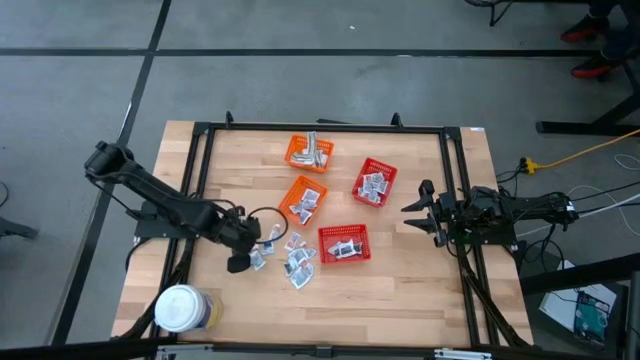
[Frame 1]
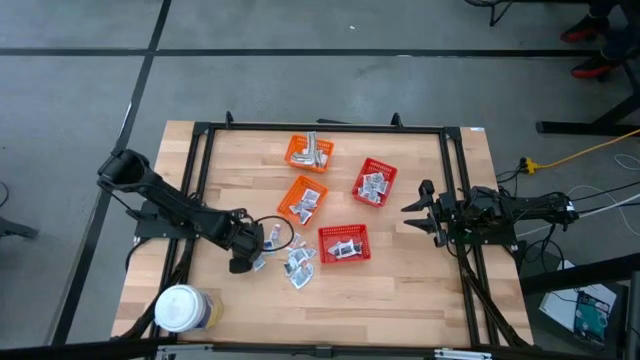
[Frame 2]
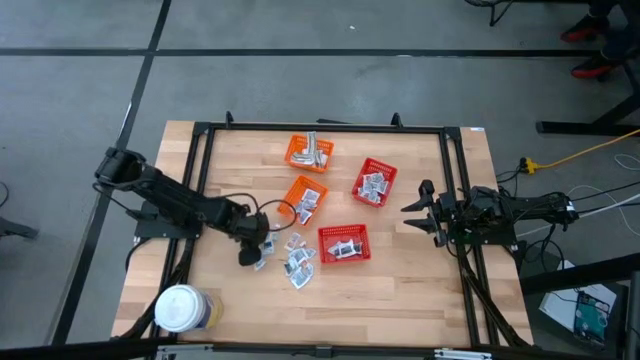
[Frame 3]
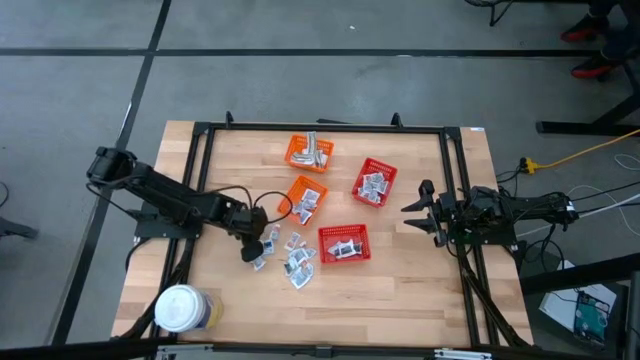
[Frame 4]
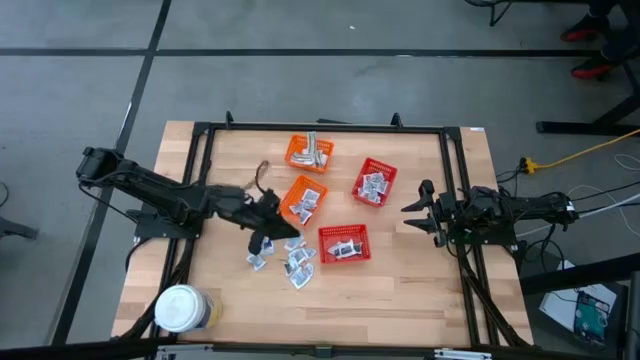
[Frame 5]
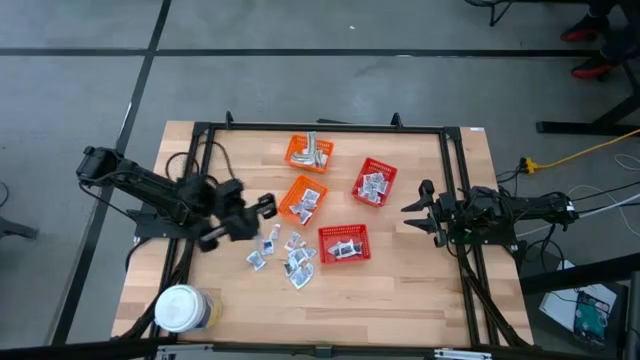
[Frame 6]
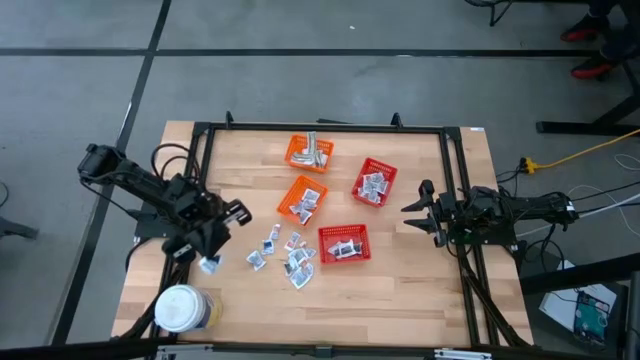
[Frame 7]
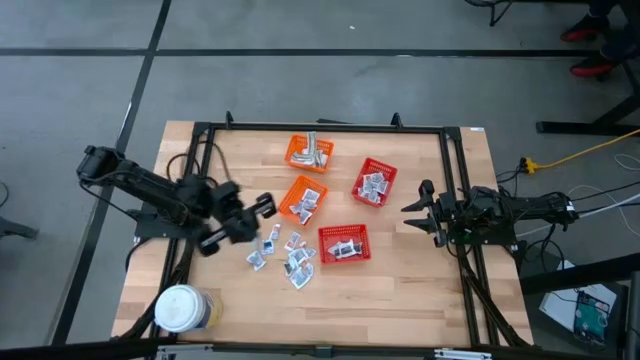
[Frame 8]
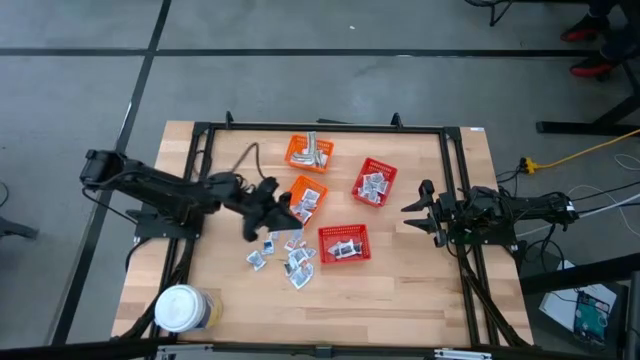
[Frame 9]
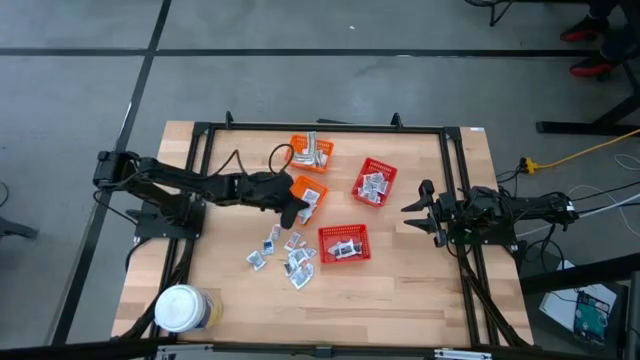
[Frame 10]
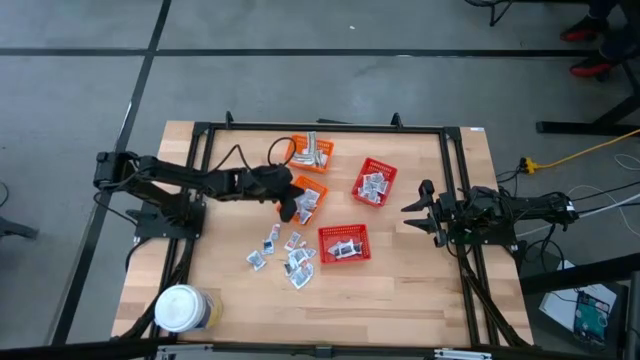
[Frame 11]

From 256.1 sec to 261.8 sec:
Task: Pick & Place First Aid Supplies
Put the blue alcohol pad into the bottom orange bin

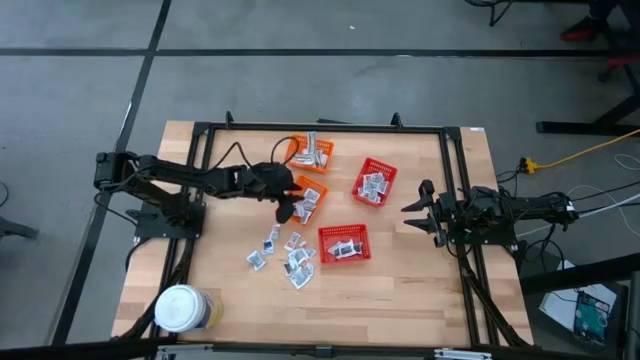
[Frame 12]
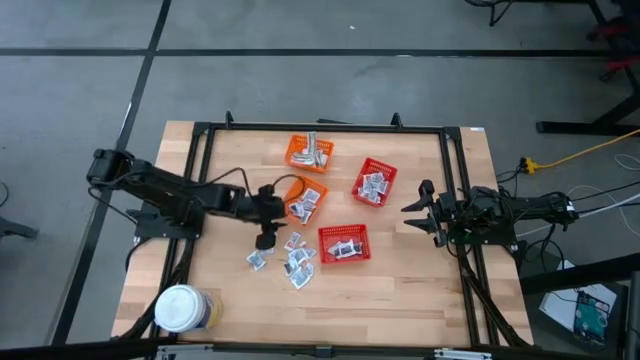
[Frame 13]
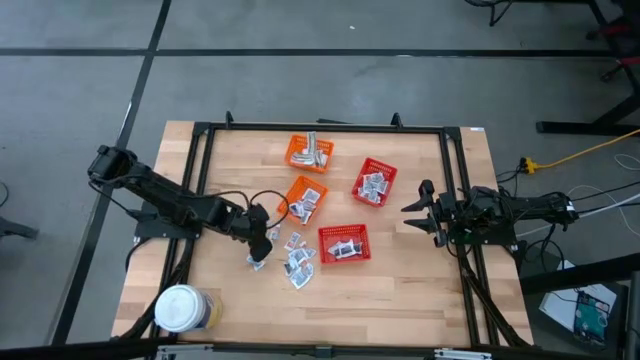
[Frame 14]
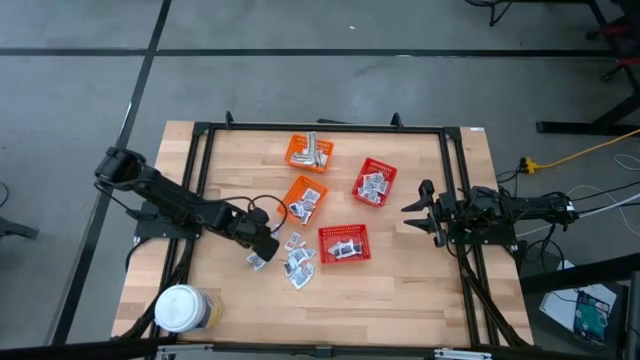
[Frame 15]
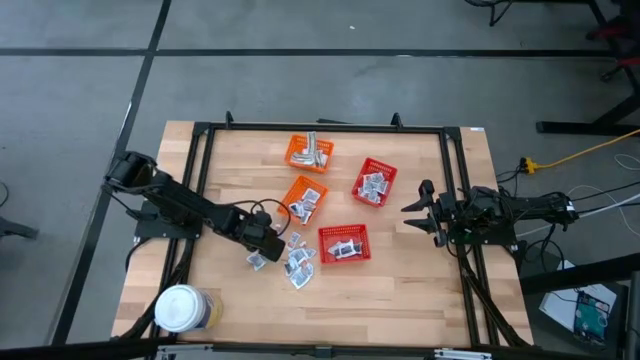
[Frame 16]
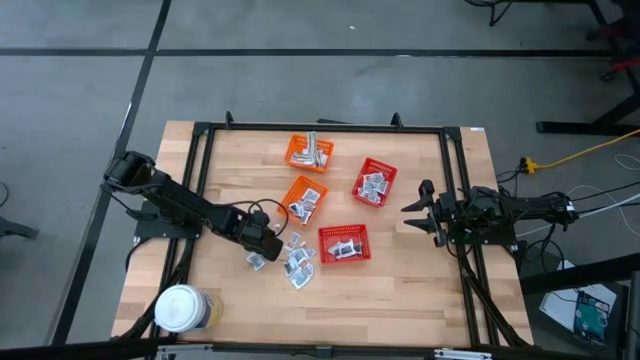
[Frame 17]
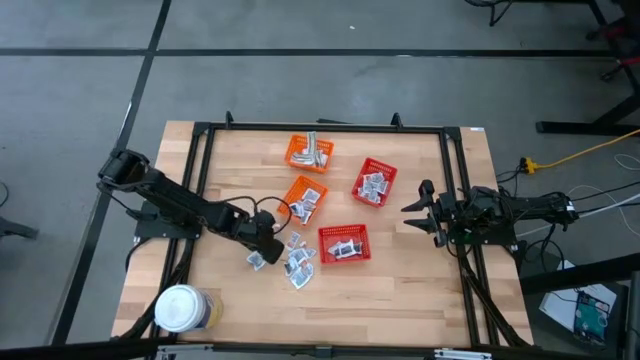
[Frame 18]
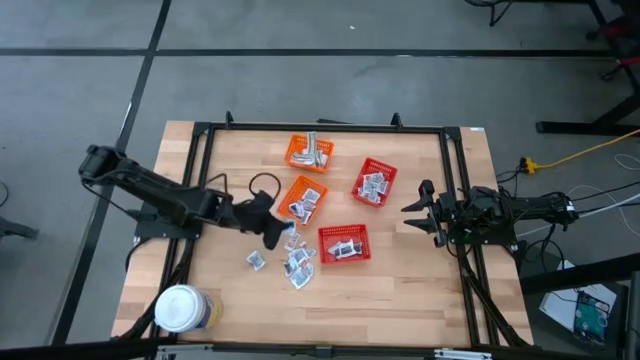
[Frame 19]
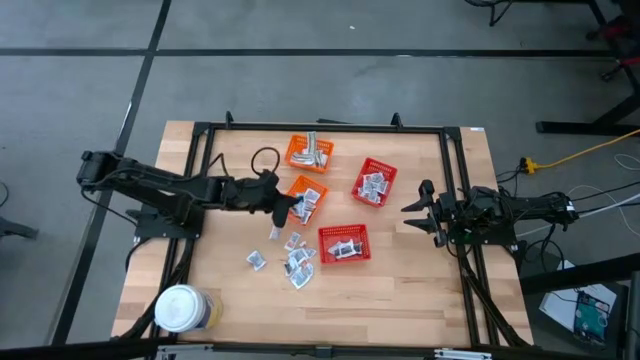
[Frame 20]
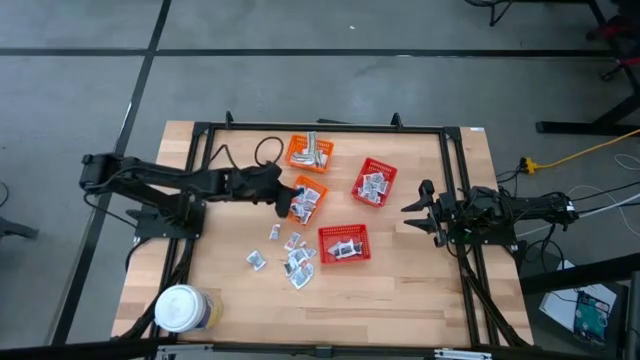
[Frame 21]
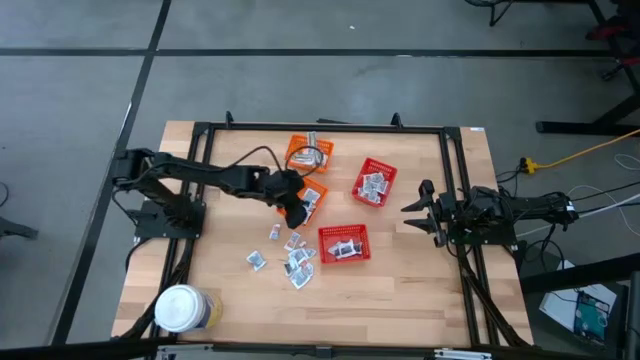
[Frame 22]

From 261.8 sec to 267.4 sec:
Put the blue alcohol pad into the bottom orange bin

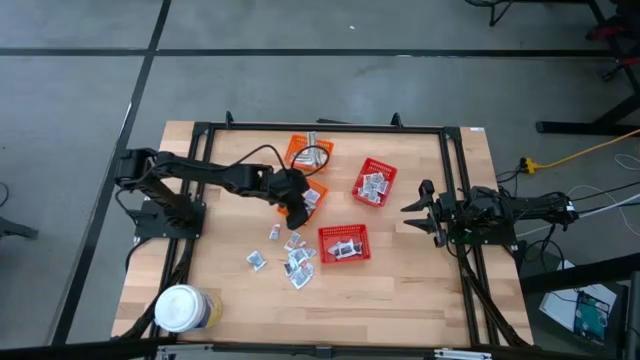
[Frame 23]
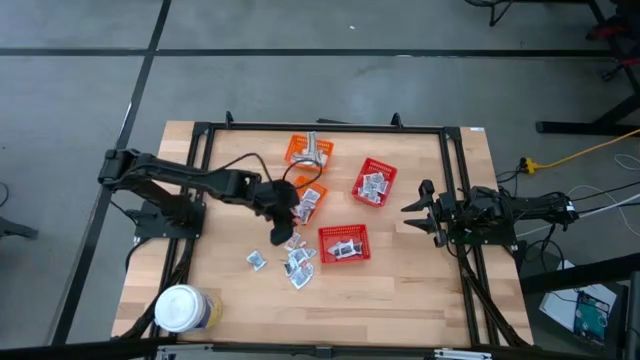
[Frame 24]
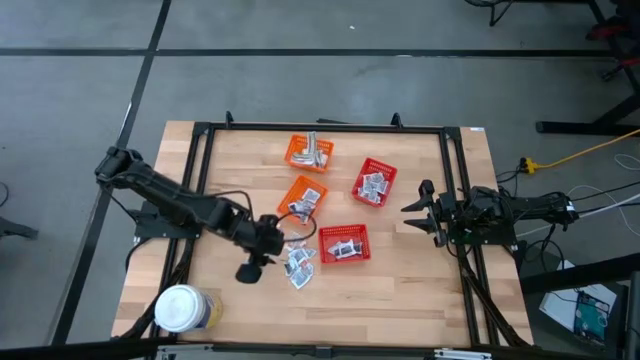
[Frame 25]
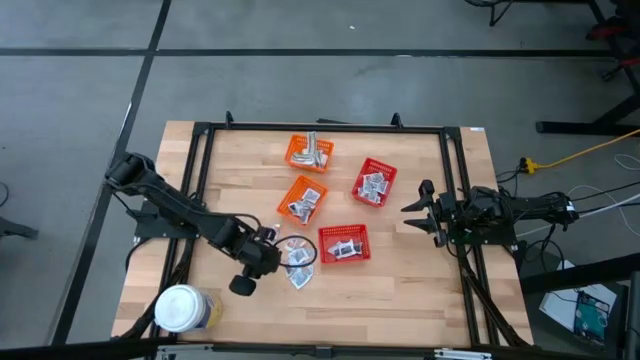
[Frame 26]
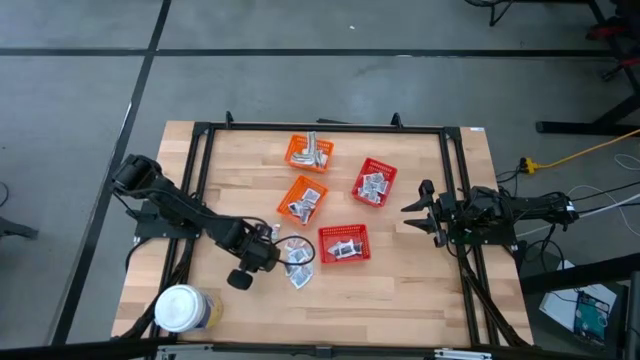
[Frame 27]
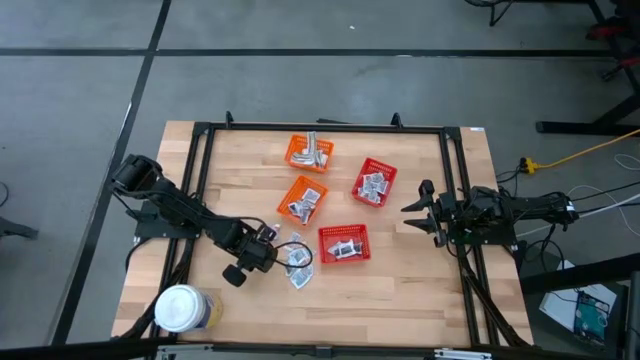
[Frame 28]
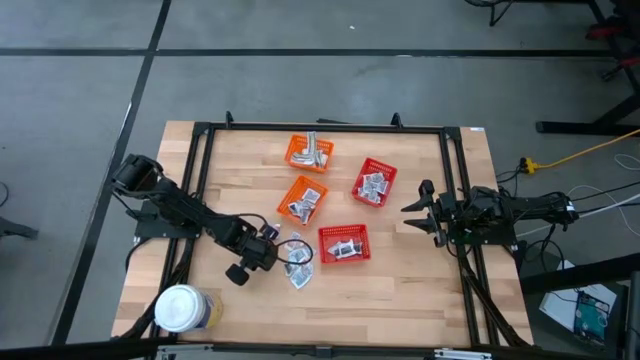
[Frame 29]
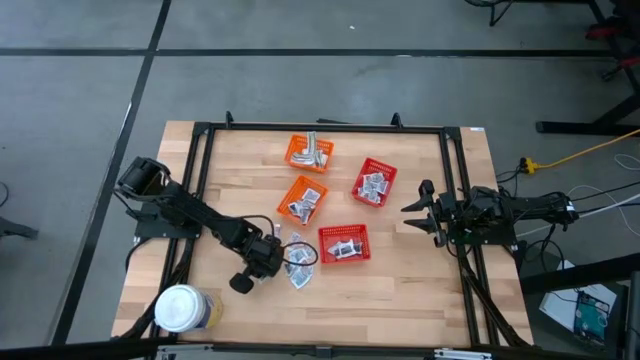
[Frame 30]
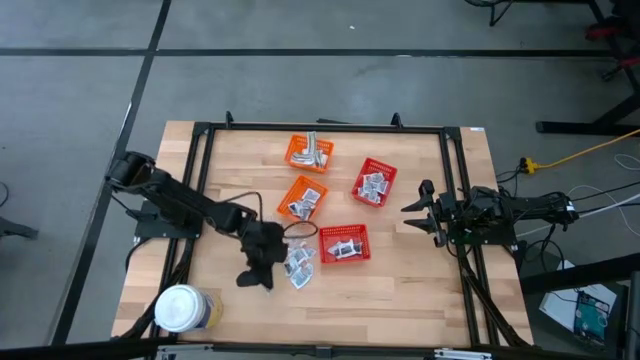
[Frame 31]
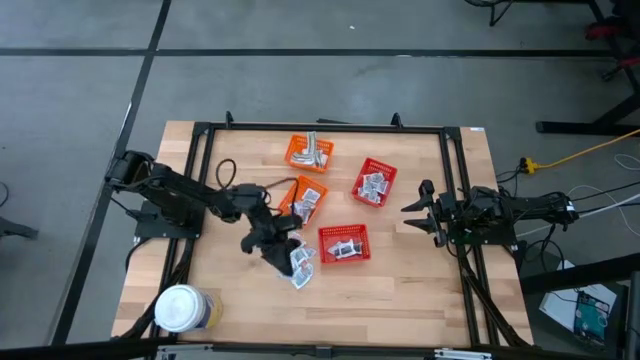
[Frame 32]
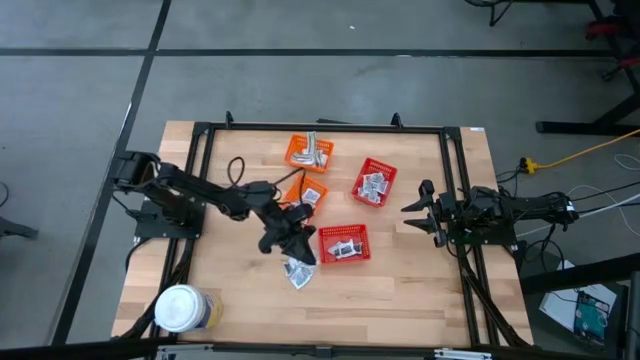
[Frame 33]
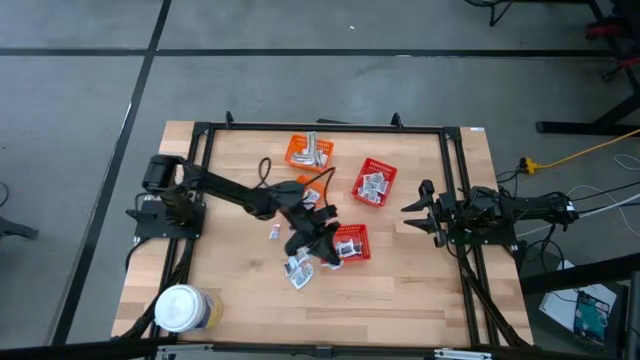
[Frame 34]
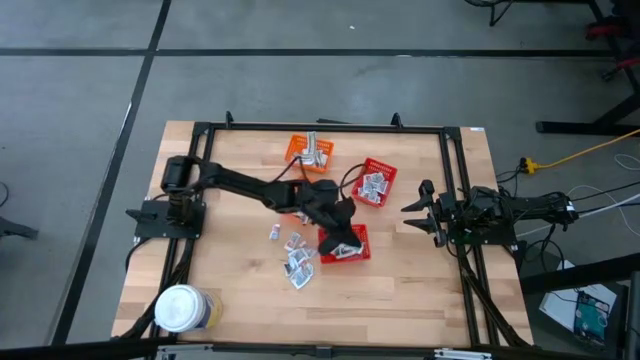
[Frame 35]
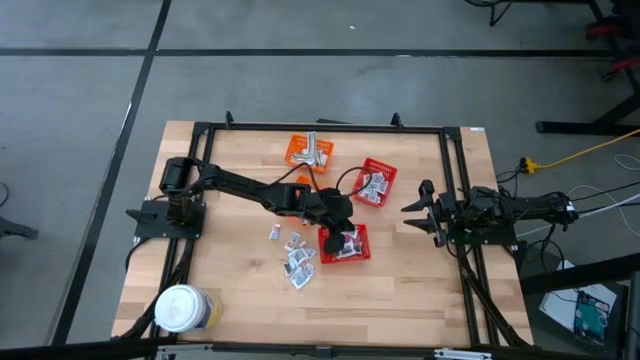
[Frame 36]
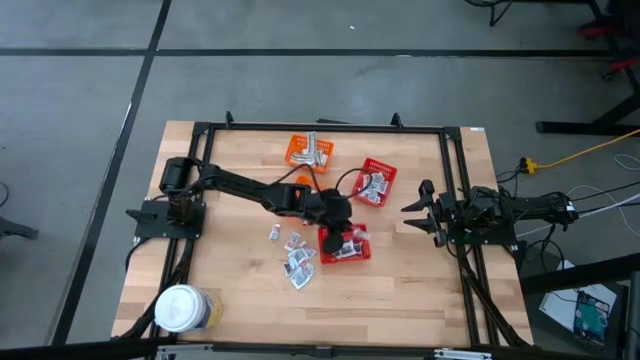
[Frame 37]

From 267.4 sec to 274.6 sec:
Put the gray towelette pack into the bottom red bin

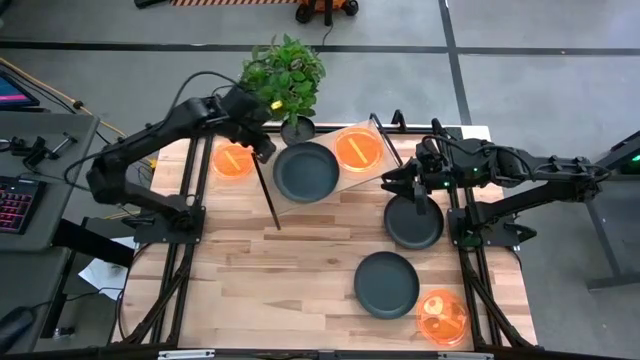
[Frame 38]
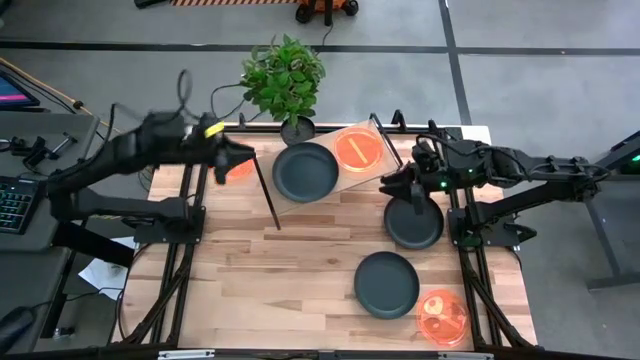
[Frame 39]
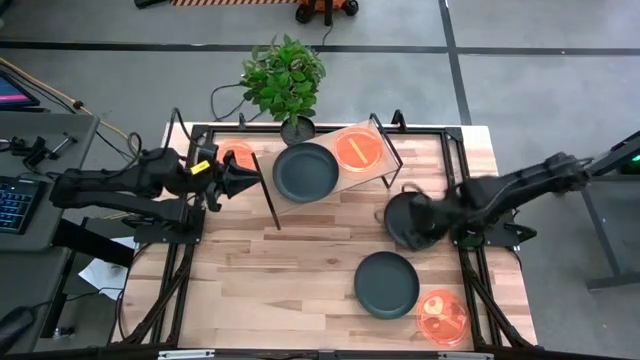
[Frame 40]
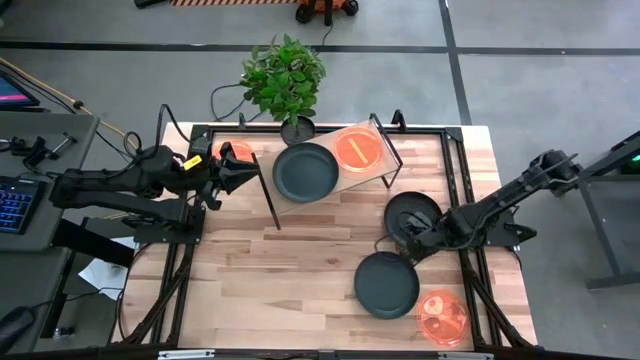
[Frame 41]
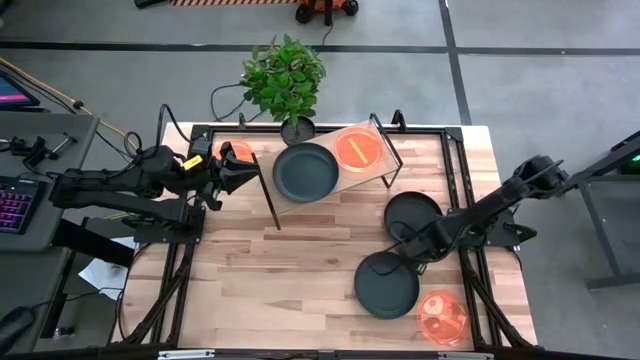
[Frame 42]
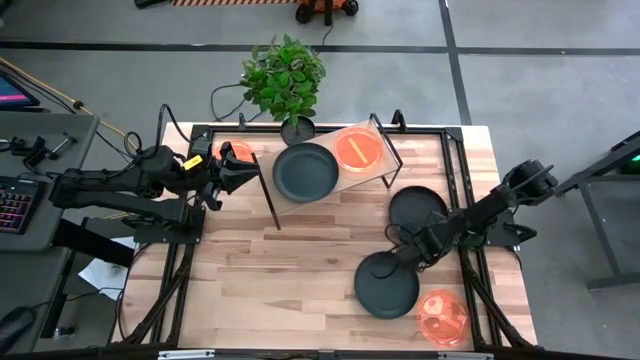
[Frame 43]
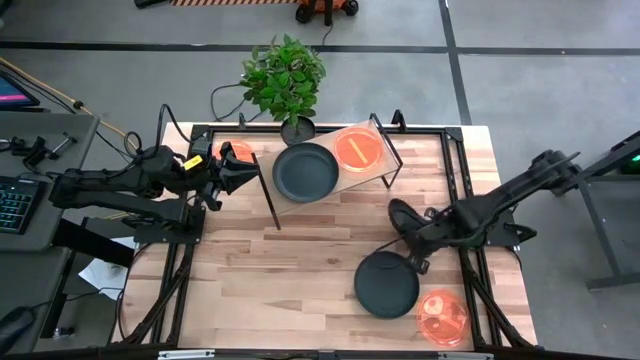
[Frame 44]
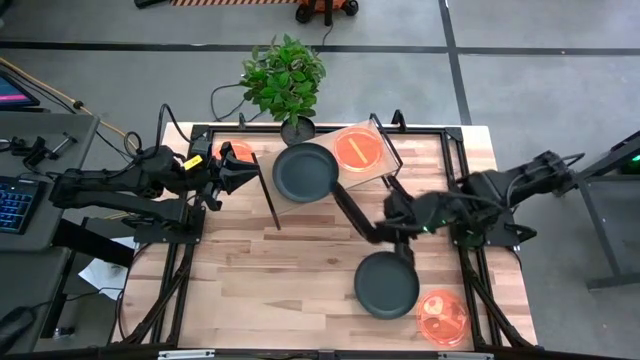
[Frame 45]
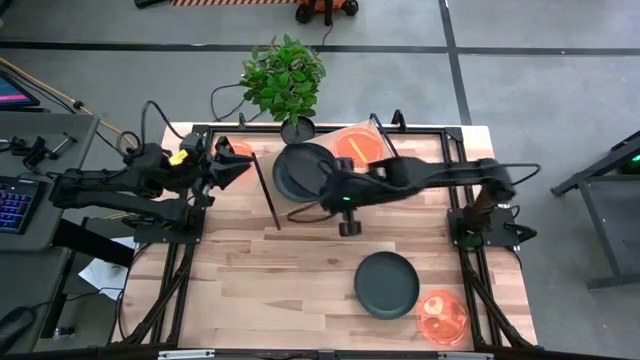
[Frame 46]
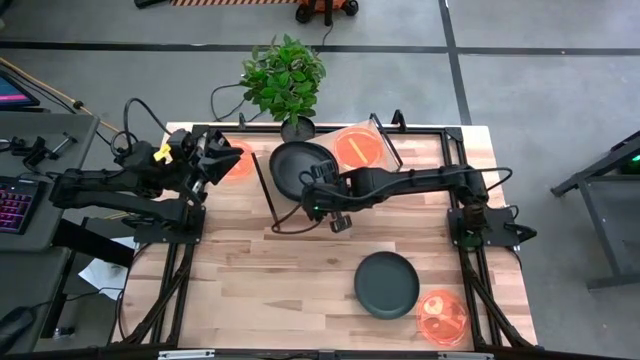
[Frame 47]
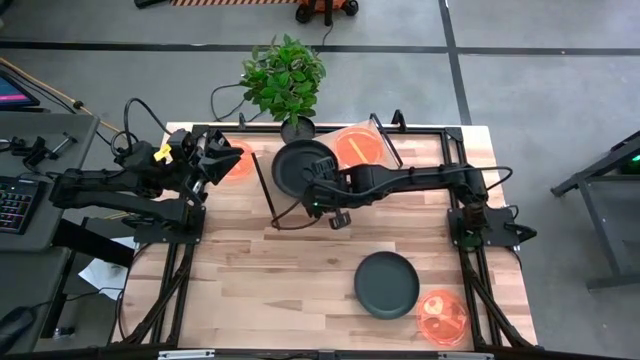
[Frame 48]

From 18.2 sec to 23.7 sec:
Task: Place and stack plates onto a shelf
Stack the top black plate on top of the black plate on the shelf
